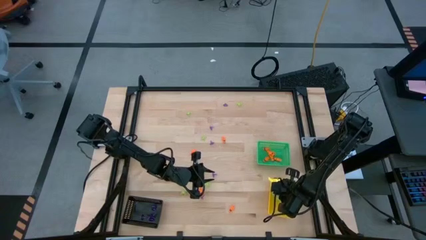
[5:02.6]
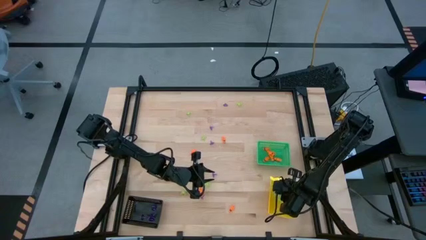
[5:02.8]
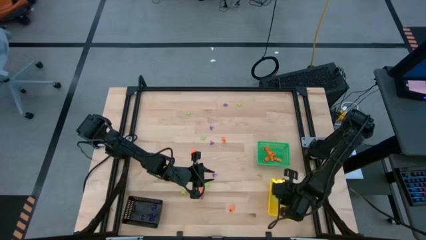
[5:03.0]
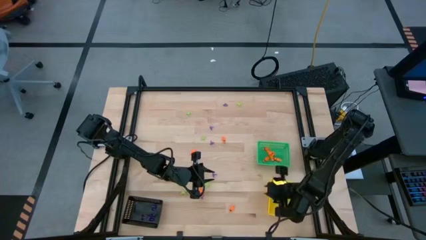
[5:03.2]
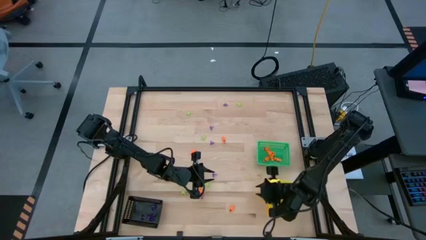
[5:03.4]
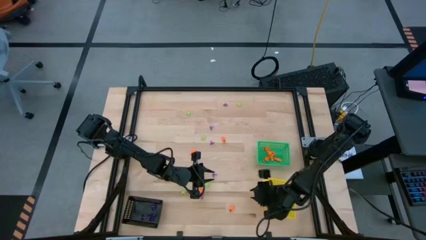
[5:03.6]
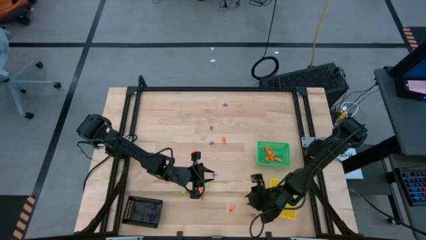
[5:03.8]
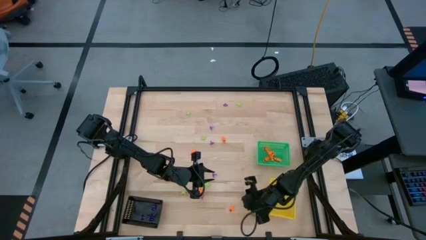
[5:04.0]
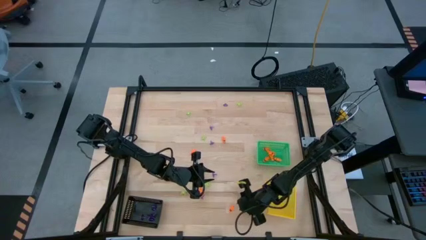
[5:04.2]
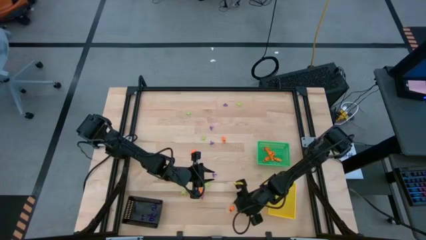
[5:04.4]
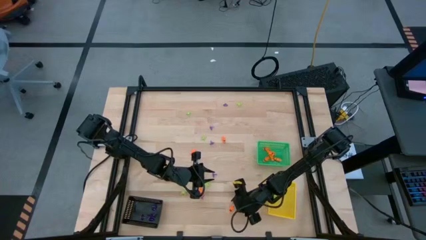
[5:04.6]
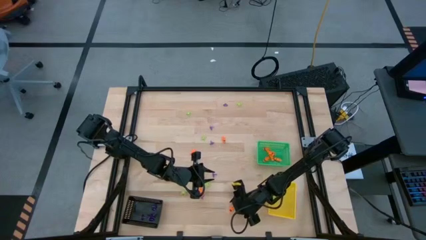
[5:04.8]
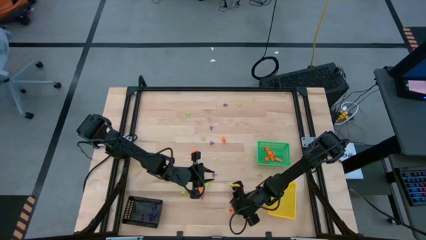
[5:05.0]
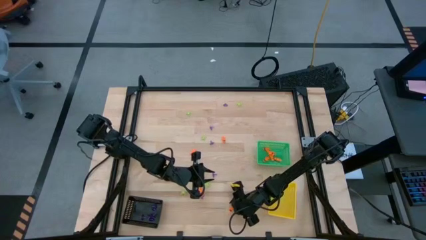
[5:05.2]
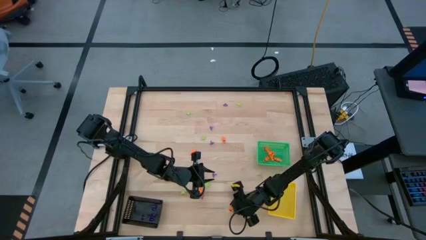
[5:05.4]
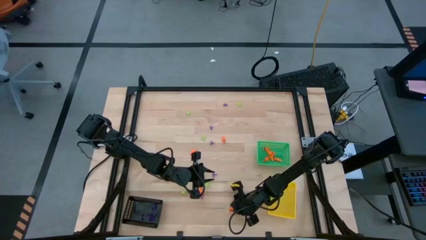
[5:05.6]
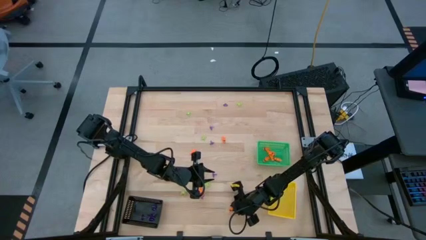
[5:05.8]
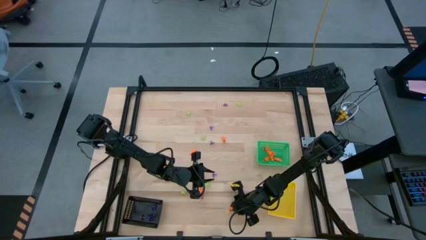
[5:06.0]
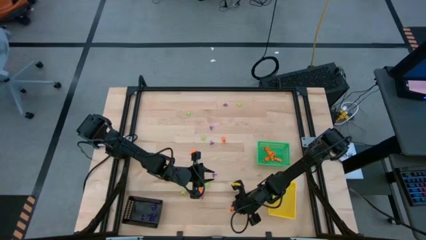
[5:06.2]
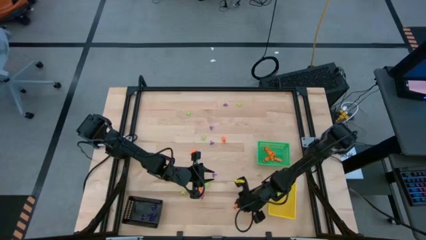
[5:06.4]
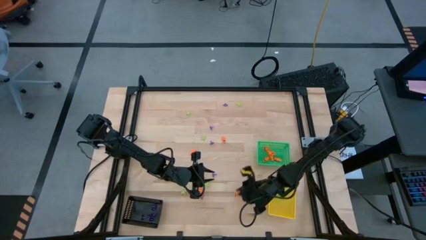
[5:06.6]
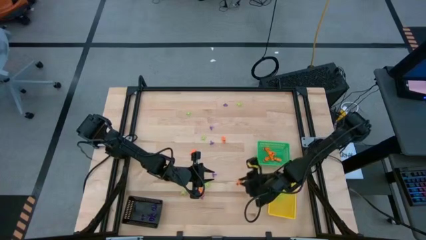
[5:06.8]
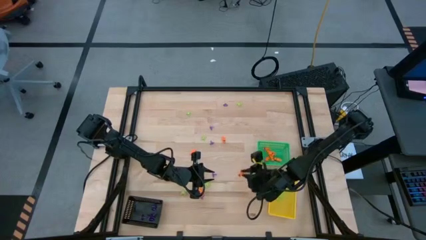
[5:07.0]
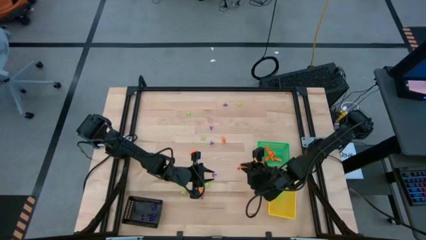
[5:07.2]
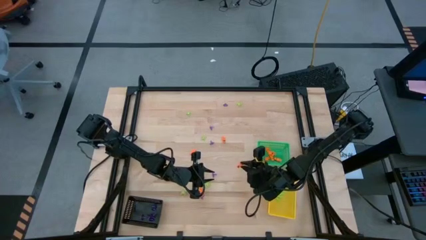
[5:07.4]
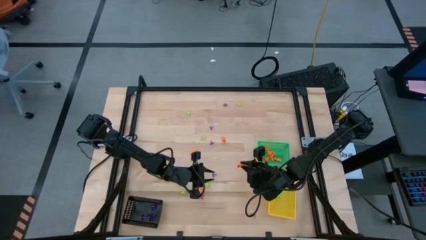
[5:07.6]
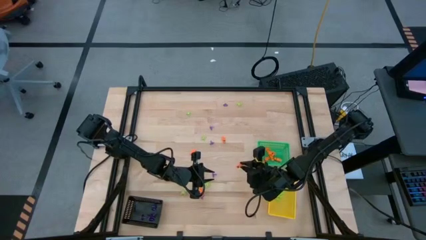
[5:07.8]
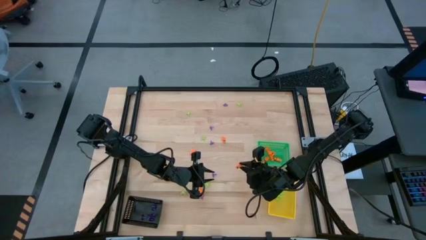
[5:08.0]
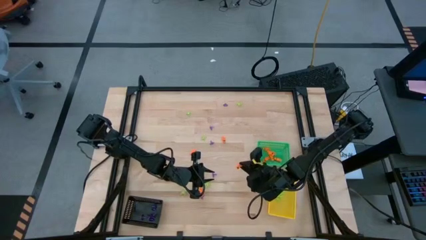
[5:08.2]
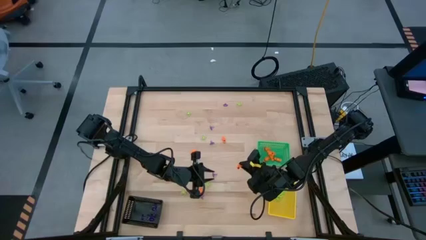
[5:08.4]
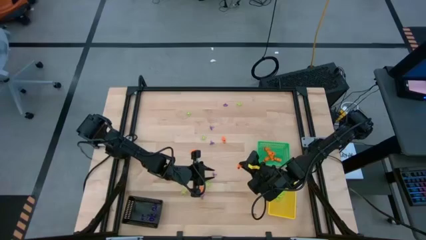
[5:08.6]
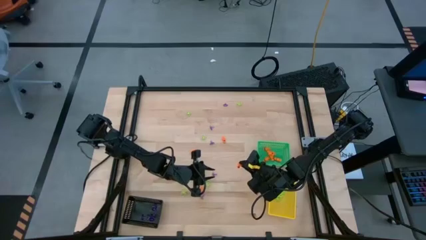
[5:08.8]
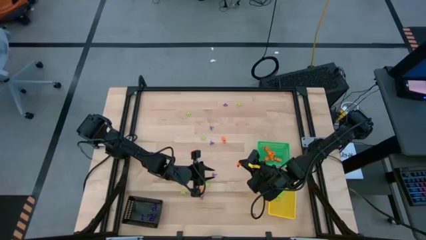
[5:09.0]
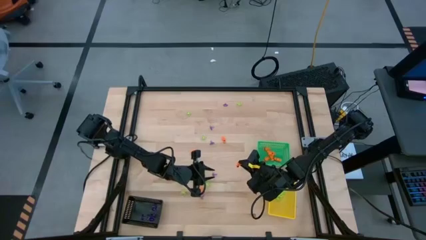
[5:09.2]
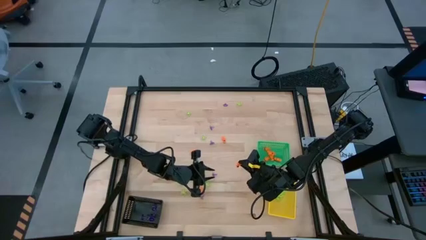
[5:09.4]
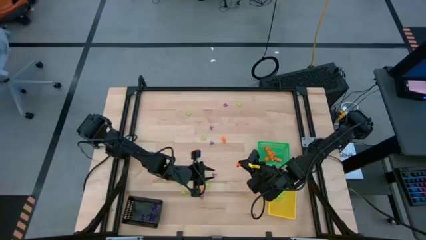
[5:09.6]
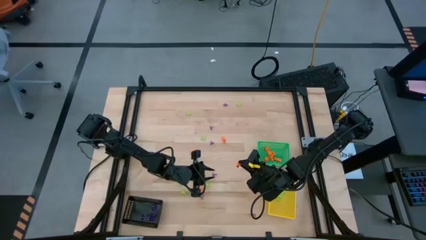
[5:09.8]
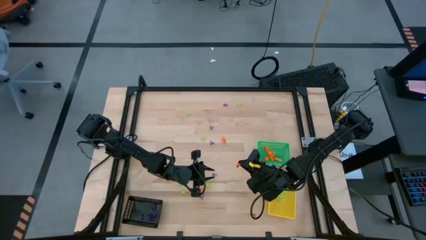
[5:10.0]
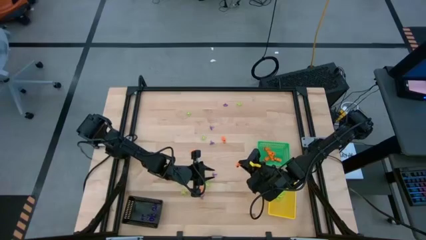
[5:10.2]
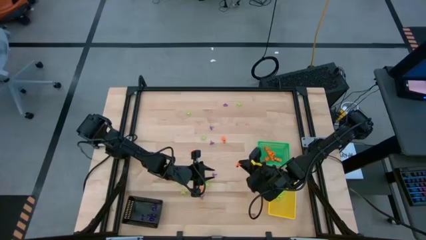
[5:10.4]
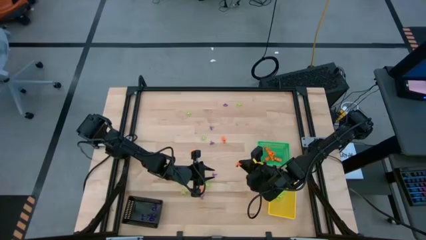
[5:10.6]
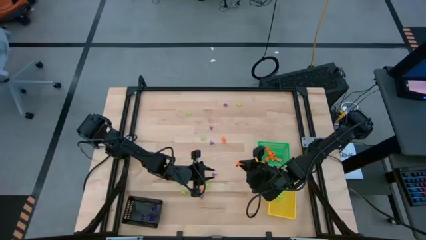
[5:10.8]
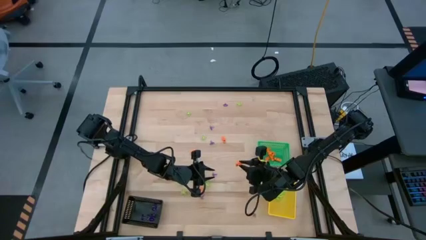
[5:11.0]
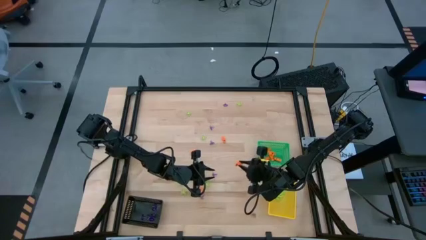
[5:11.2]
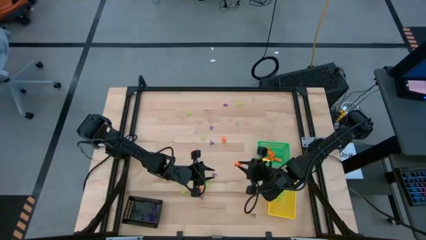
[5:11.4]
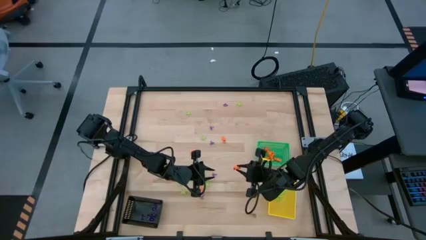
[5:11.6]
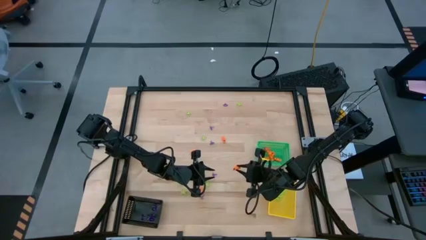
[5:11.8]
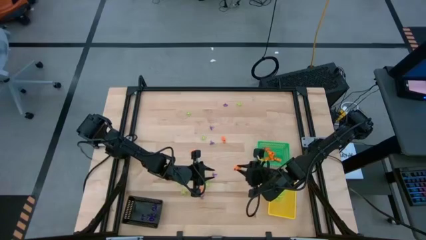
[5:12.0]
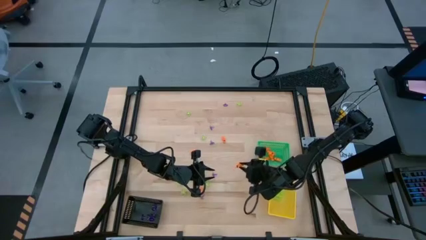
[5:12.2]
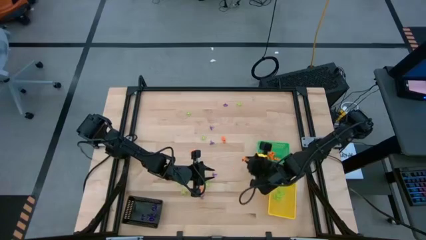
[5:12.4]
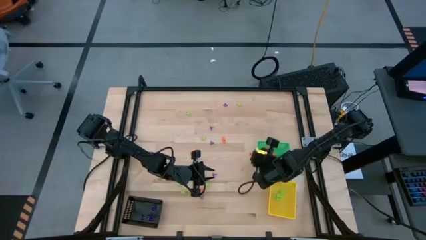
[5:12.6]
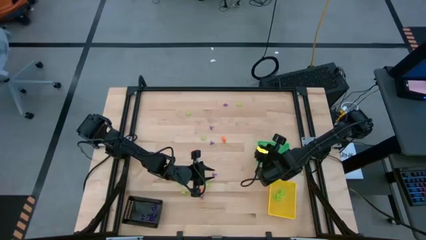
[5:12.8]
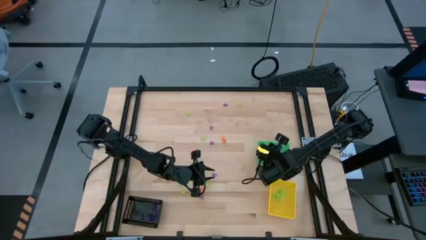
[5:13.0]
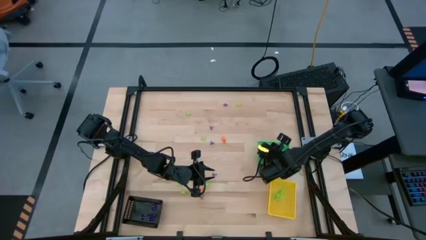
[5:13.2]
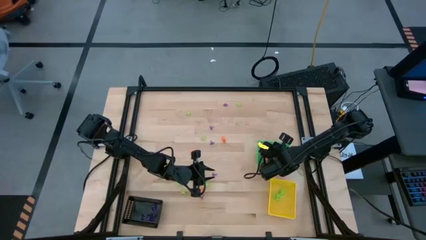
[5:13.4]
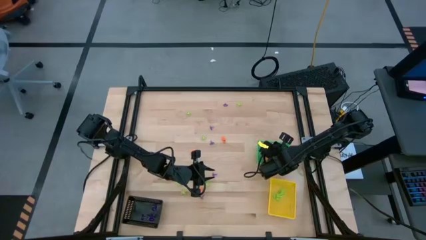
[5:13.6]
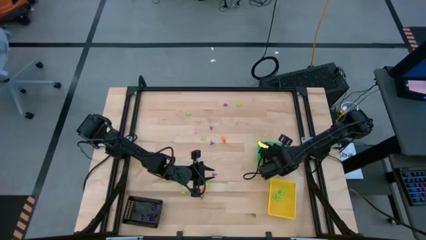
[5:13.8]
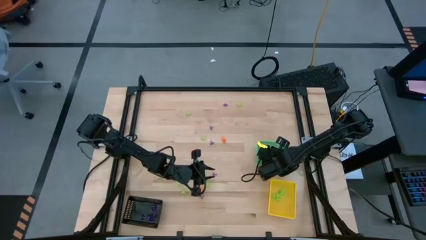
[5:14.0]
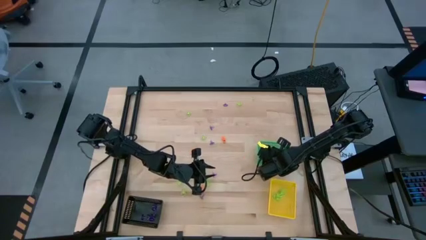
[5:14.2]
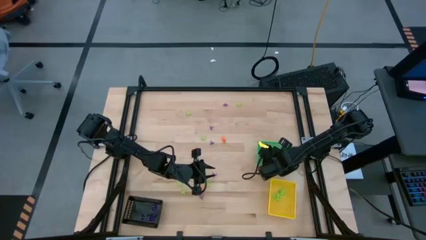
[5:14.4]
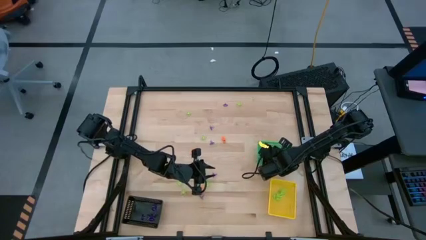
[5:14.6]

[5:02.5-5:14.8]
Task: Sort Halloween decoration
Put the orange skeleton toy into the green bin

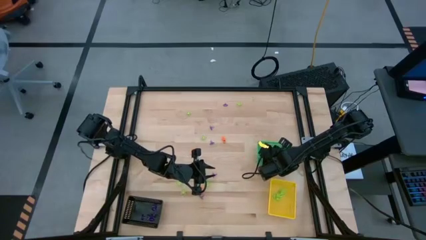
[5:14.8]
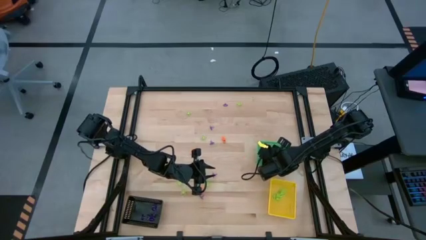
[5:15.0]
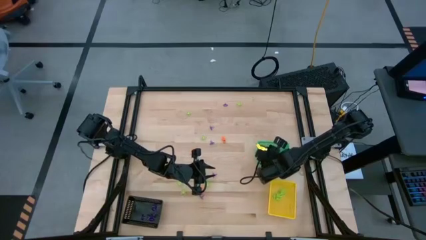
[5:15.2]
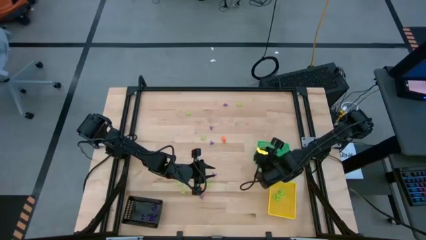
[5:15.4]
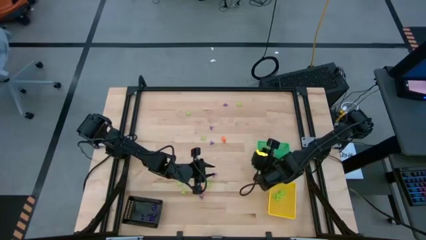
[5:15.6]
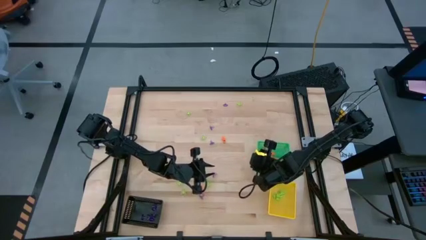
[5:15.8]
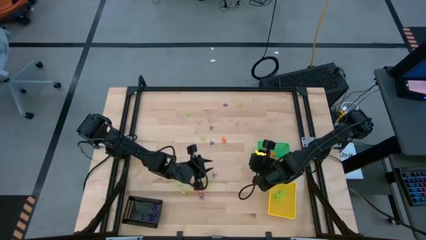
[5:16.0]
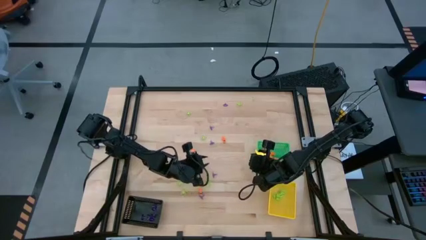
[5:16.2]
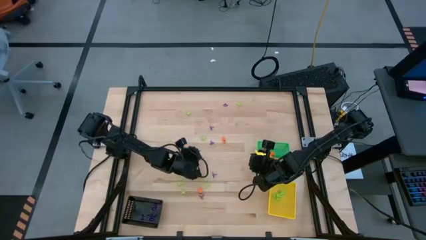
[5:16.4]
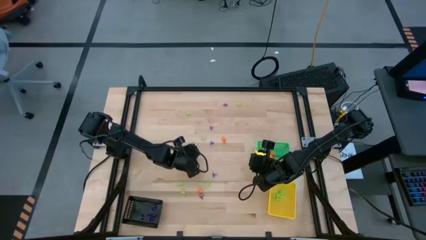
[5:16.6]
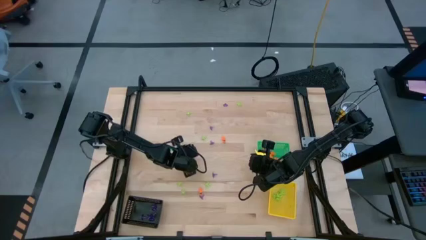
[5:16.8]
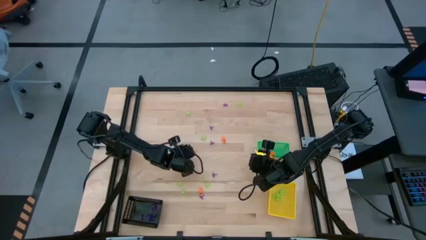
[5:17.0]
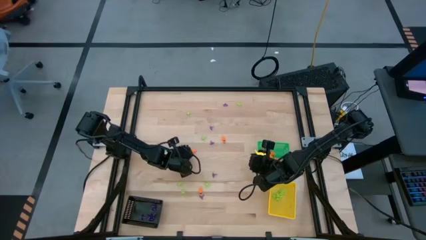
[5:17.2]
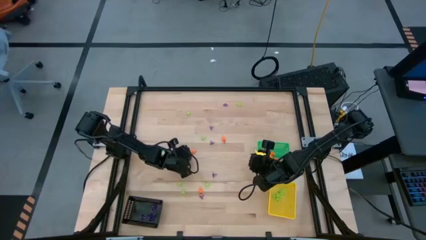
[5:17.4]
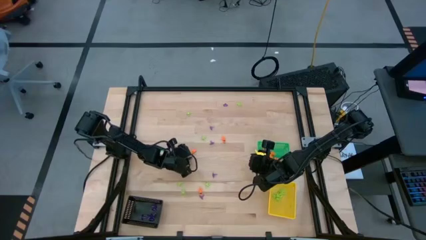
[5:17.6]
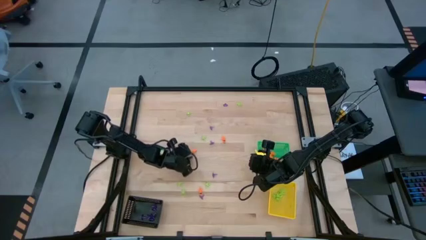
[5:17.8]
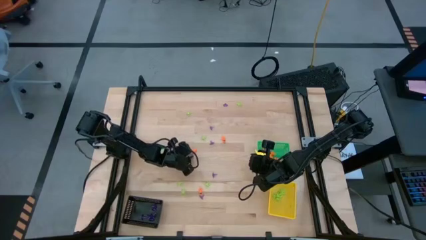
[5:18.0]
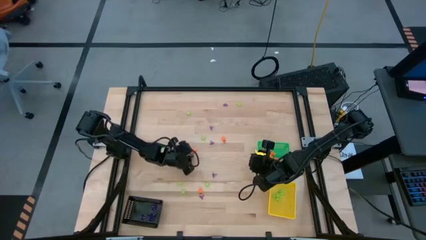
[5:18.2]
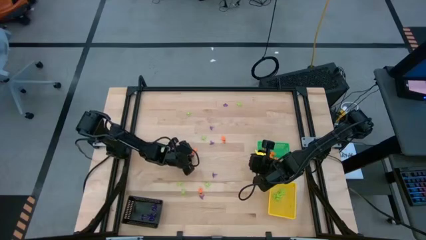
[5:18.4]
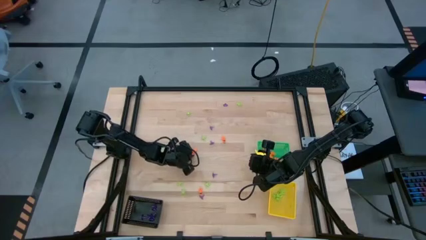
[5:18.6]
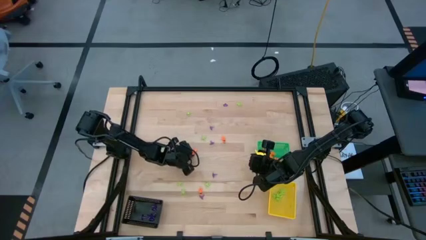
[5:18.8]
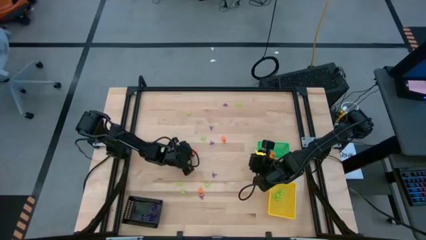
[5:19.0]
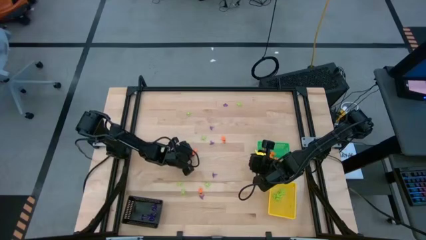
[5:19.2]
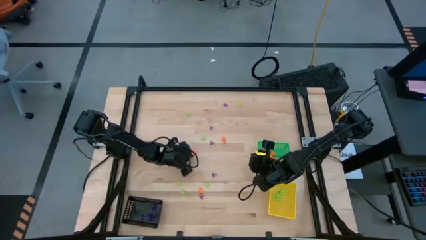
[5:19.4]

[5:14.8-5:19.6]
Put the orange skeleton toy into the green bin
